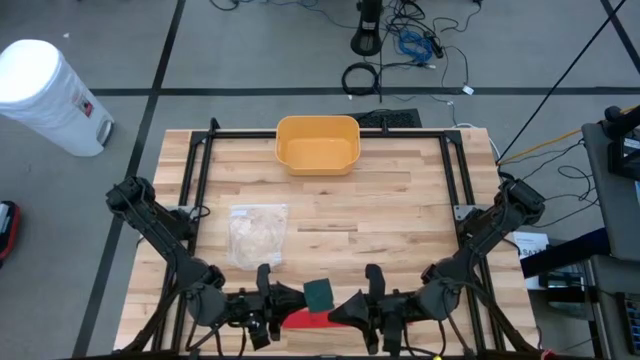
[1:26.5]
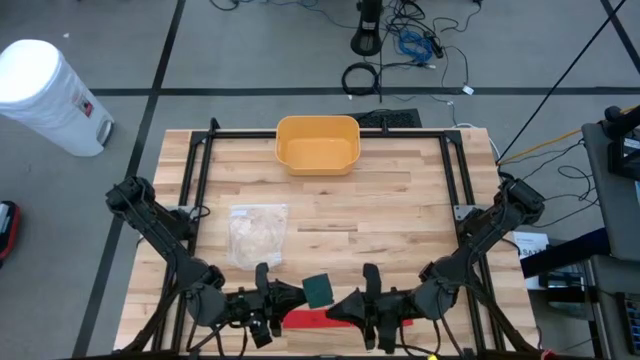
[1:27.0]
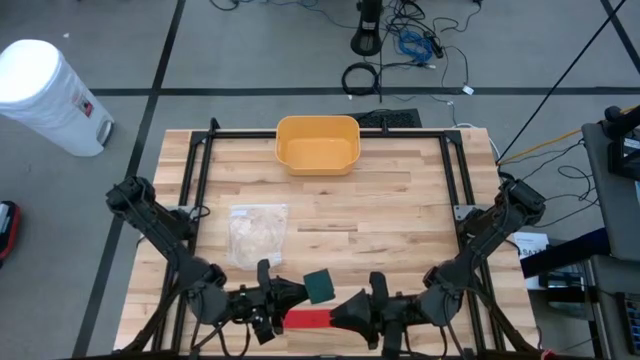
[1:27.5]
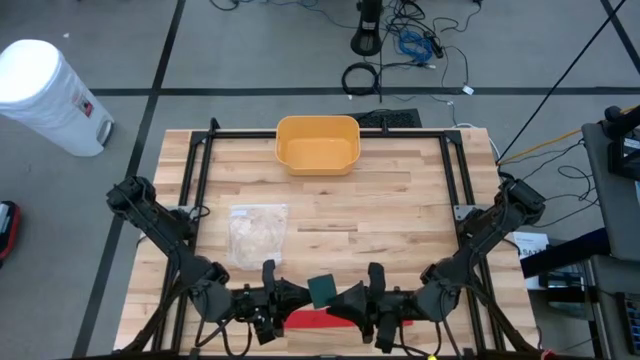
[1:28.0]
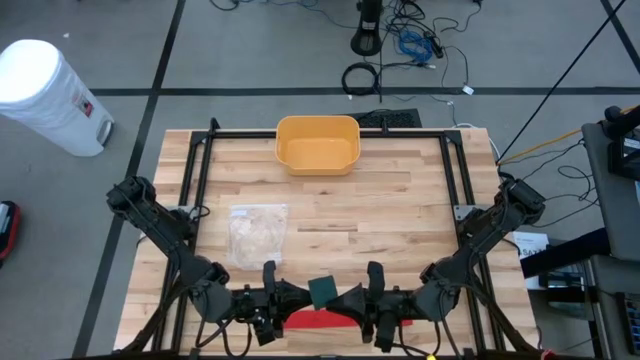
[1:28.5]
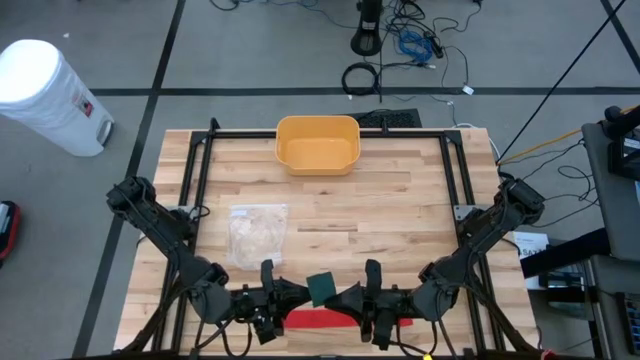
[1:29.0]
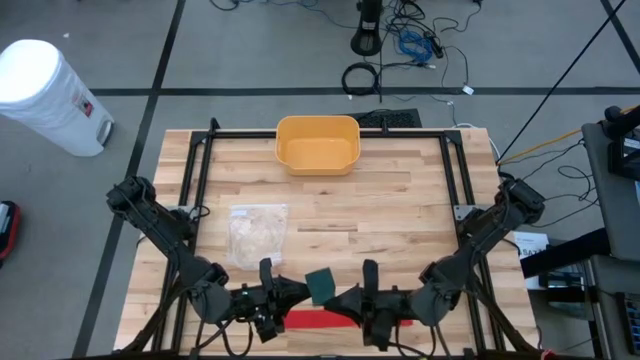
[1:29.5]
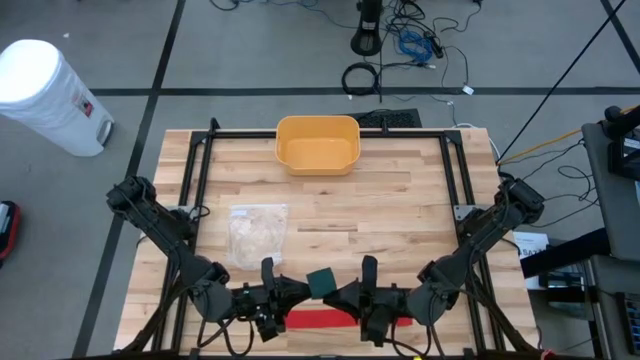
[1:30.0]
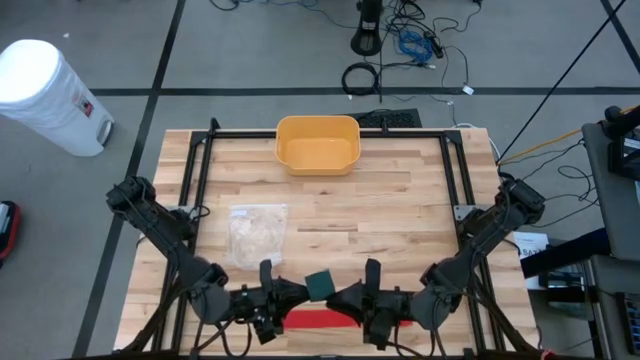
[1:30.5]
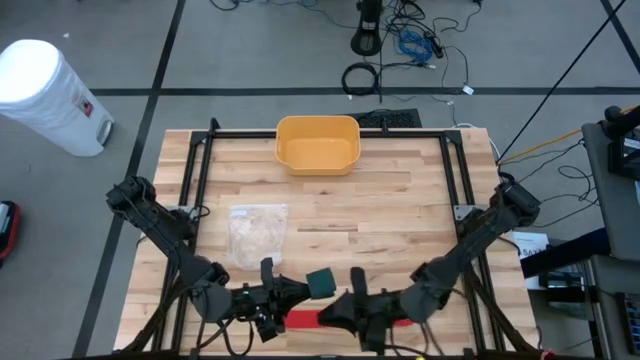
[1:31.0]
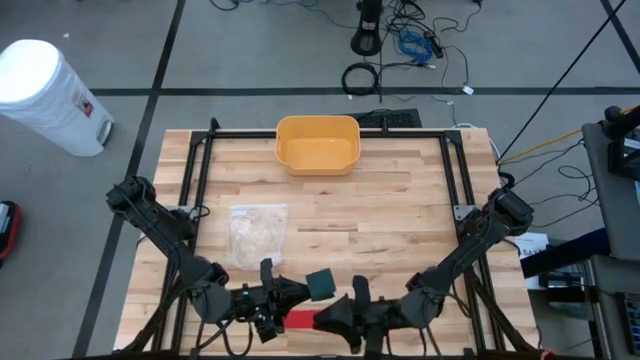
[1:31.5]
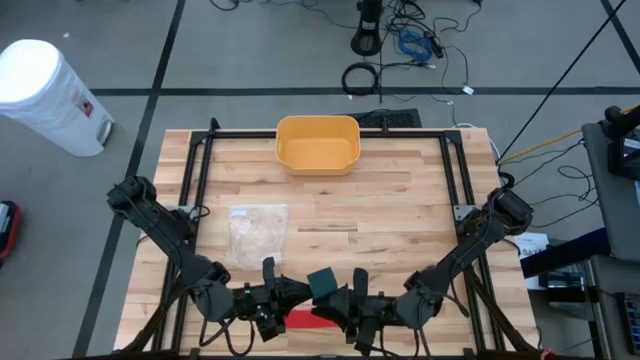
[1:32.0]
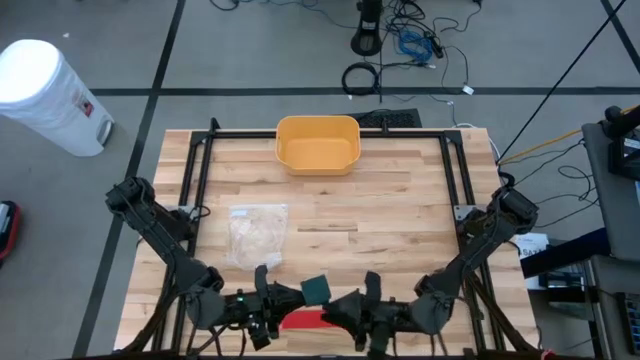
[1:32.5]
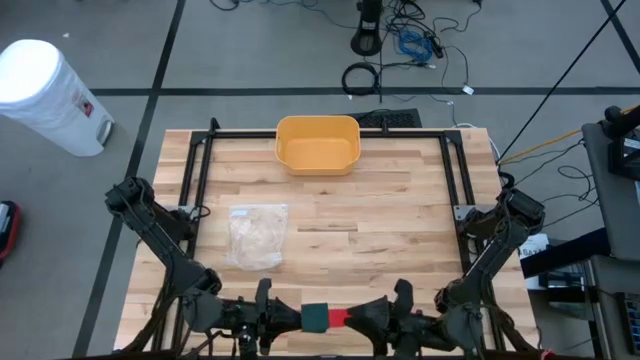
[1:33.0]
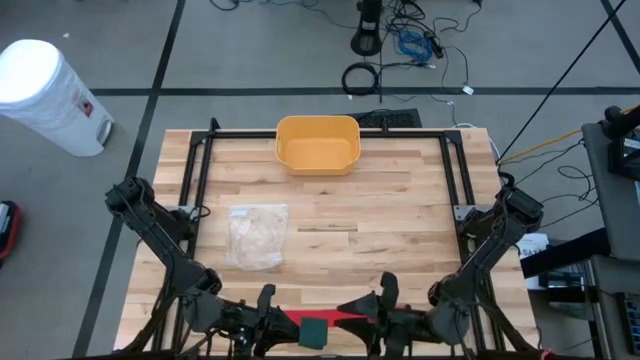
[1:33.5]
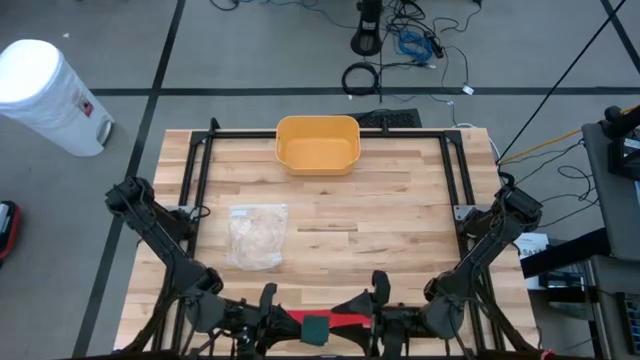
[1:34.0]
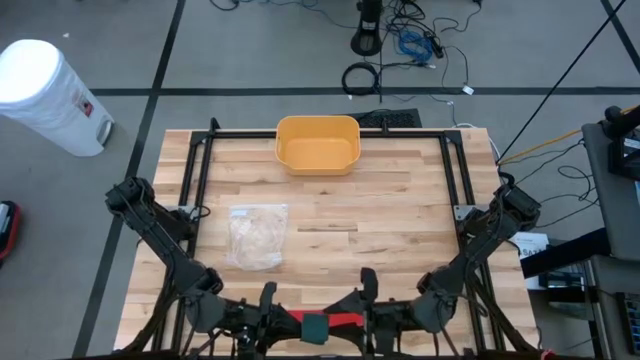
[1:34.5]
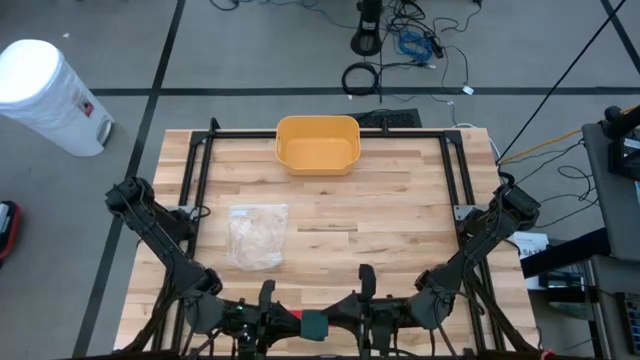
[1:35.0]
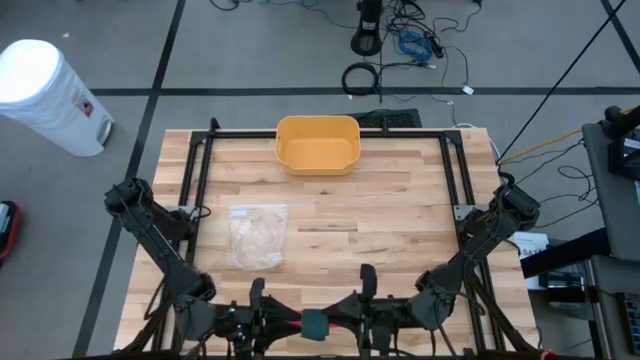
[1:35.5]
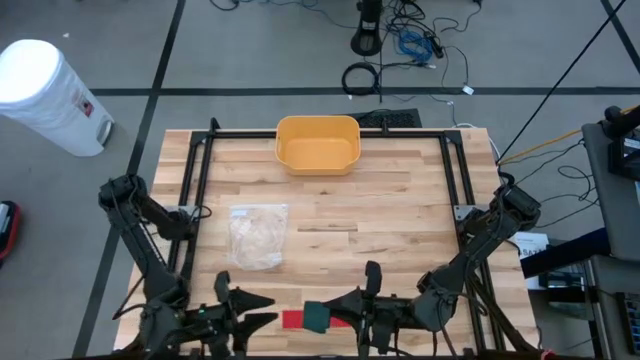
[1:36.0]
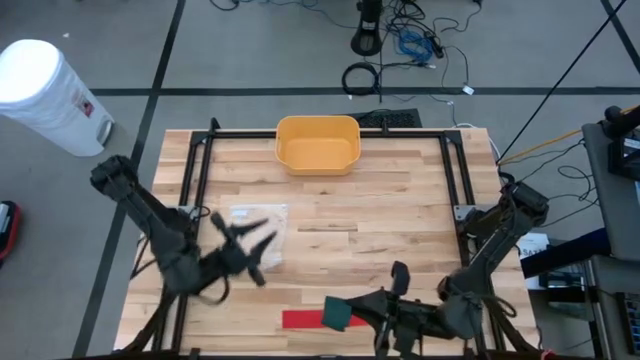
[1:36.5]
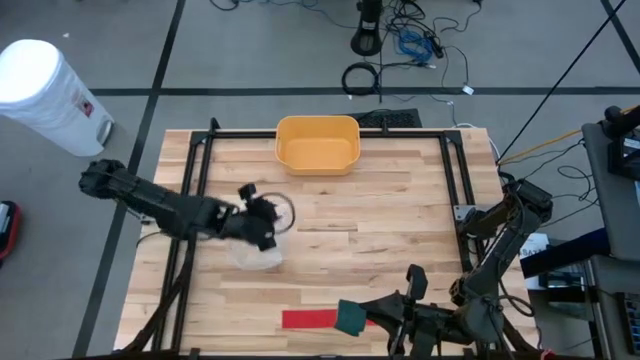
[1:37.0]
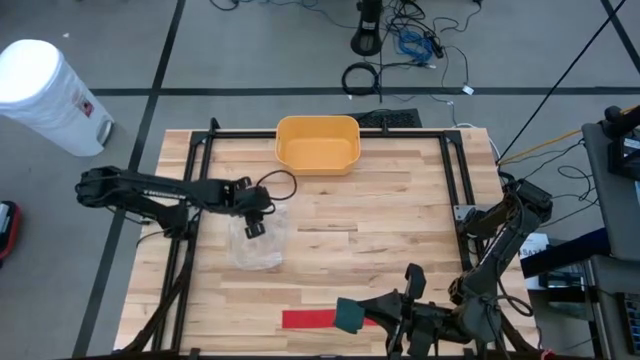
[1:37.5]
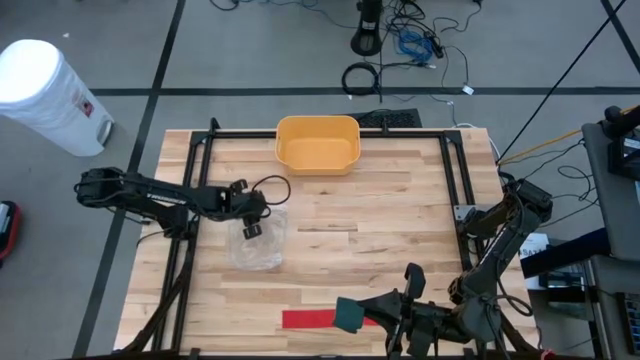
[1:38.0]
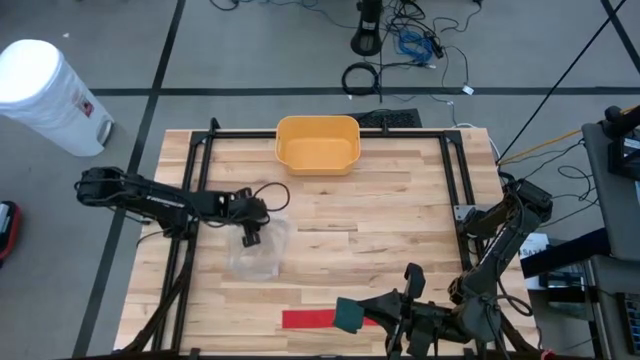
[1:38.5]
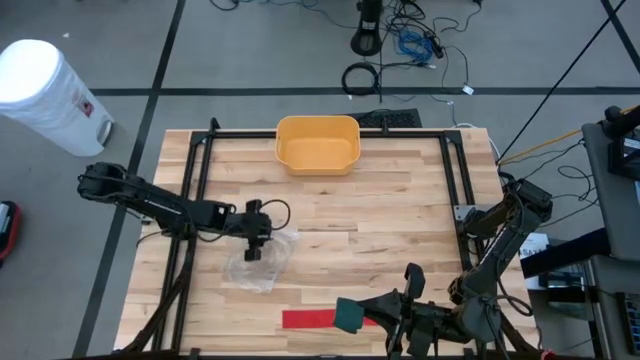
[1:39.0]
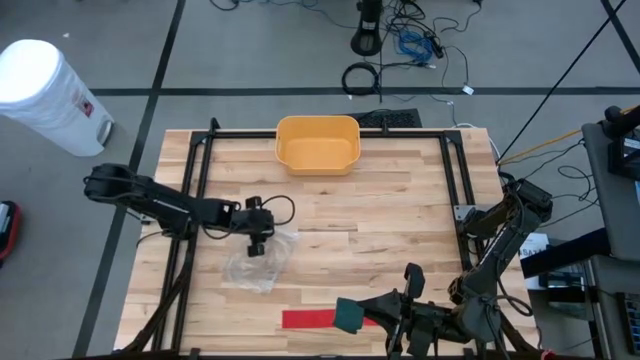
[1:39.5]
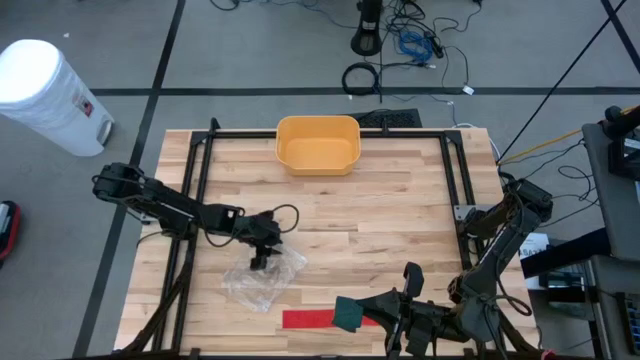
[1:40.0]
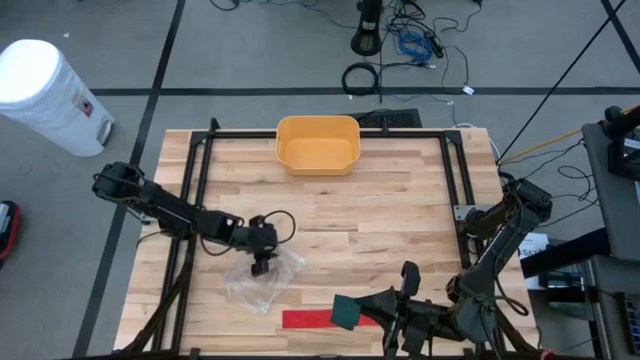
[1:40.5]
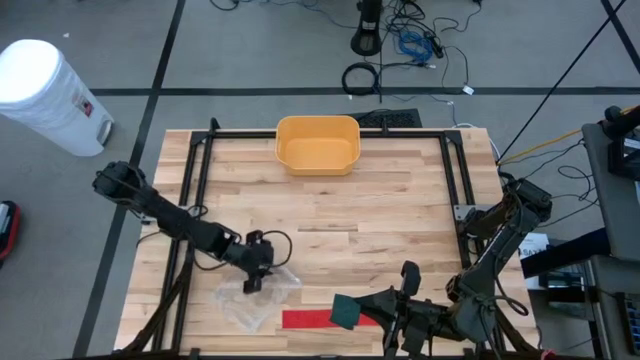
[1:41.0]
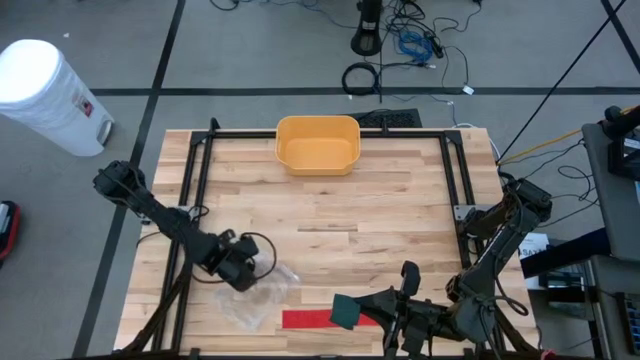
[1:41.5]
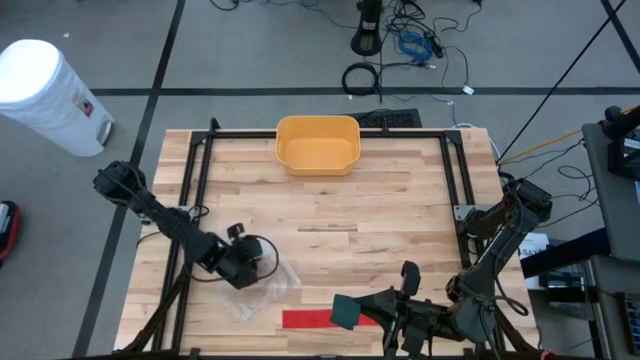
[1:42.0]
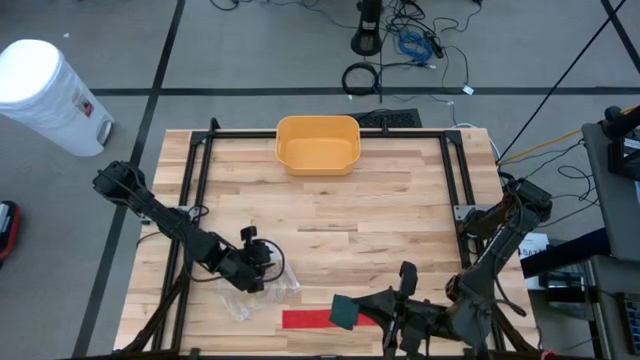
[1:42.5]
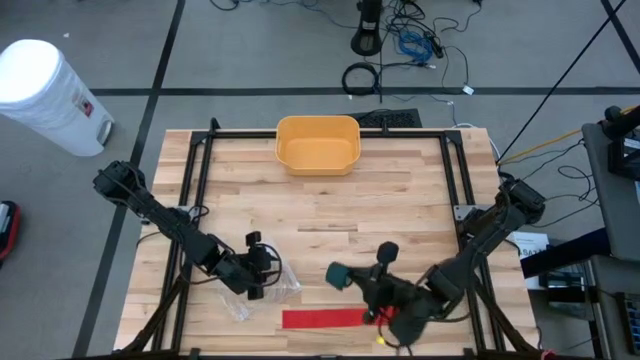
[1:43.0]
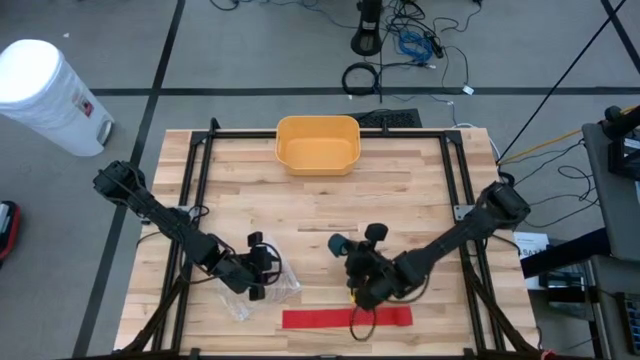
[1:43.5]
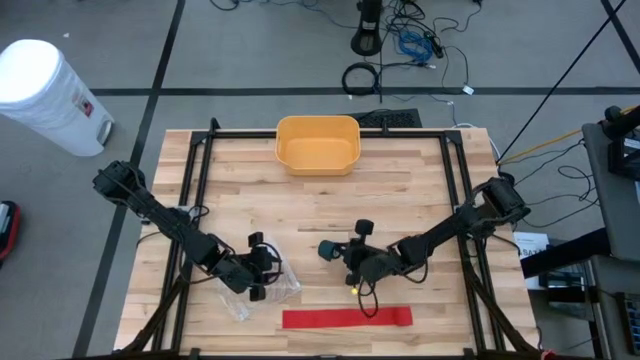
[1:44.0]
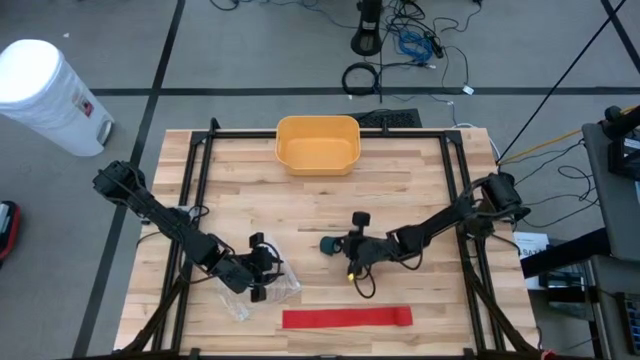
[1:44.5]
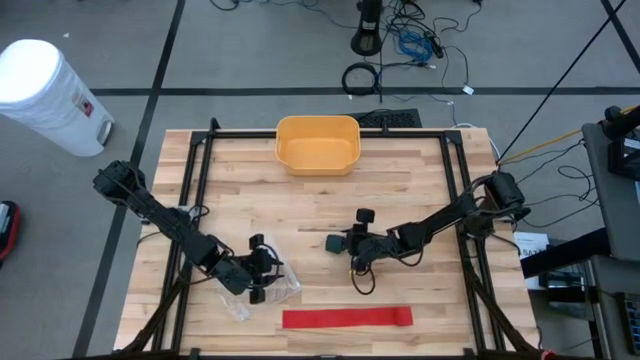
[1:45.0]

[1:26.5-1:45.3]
Task: Roll bandage
Roll the green bandage
